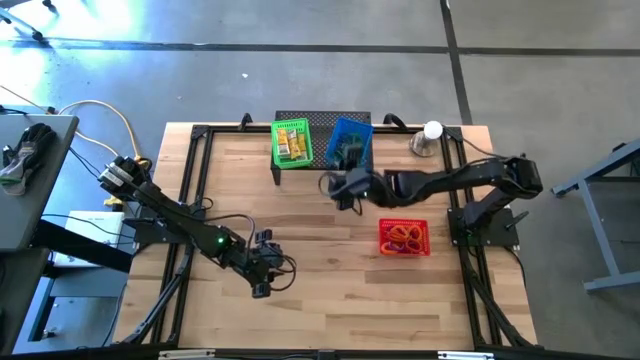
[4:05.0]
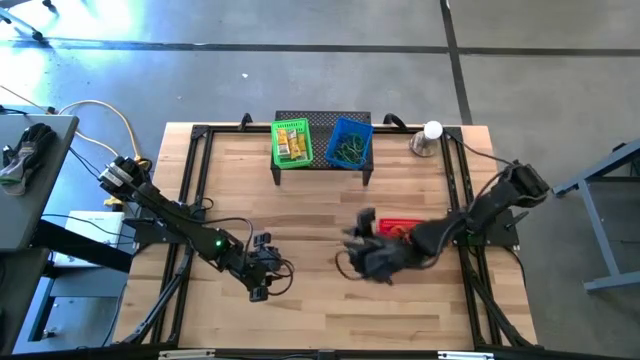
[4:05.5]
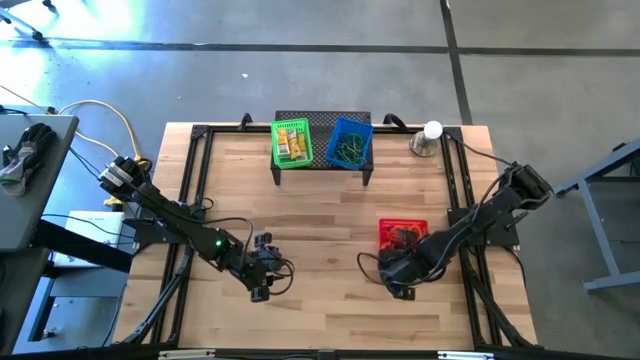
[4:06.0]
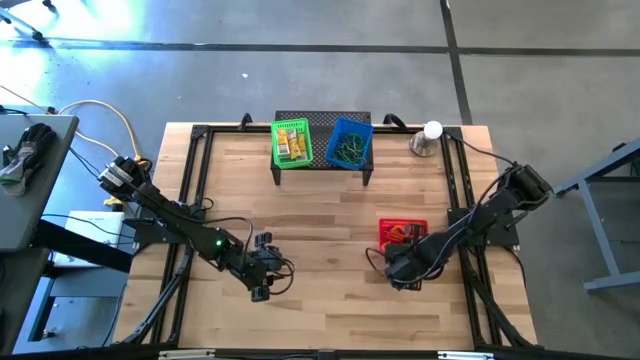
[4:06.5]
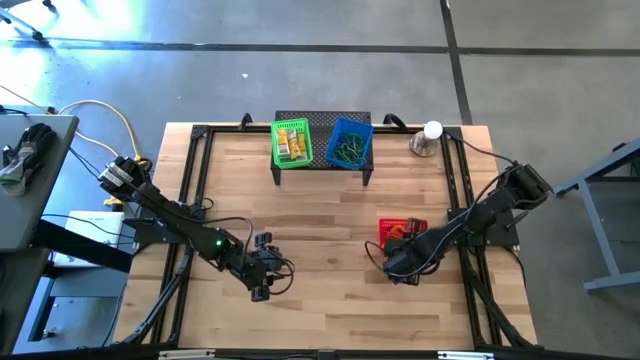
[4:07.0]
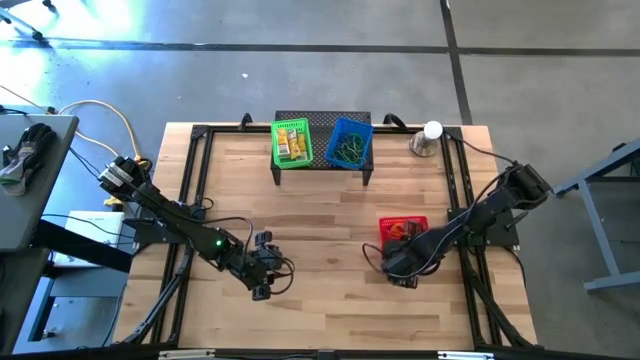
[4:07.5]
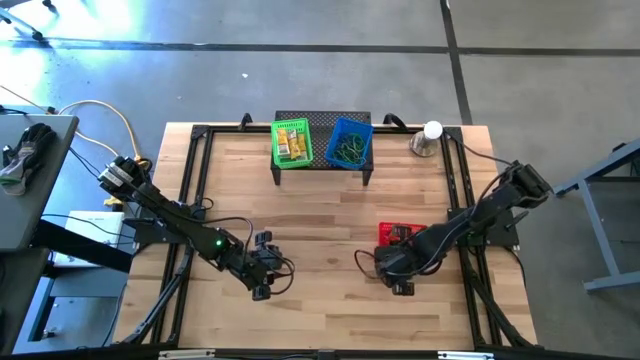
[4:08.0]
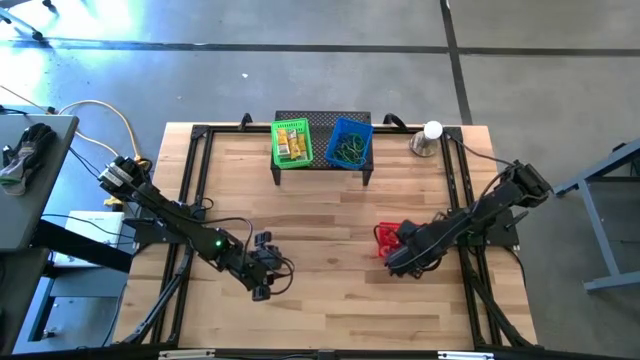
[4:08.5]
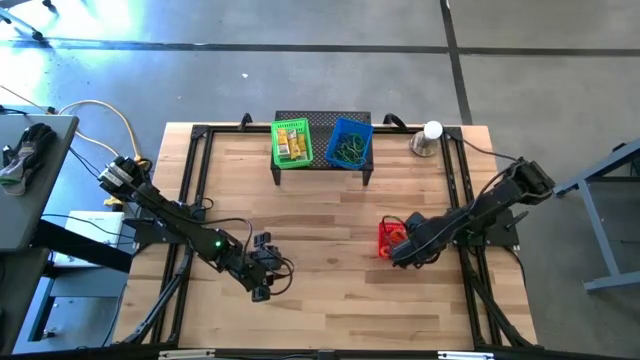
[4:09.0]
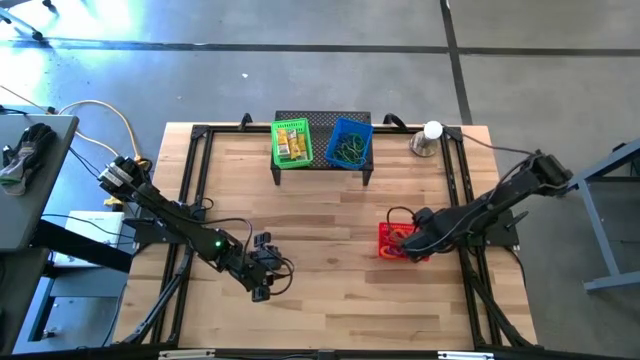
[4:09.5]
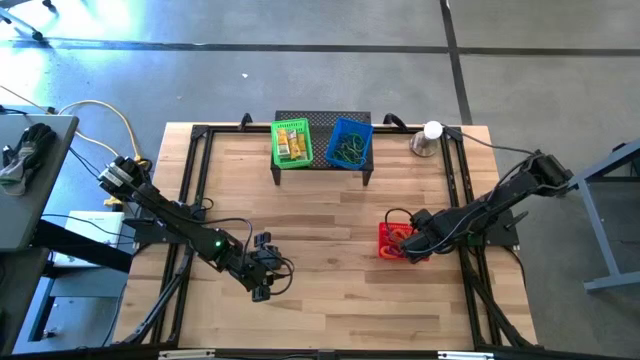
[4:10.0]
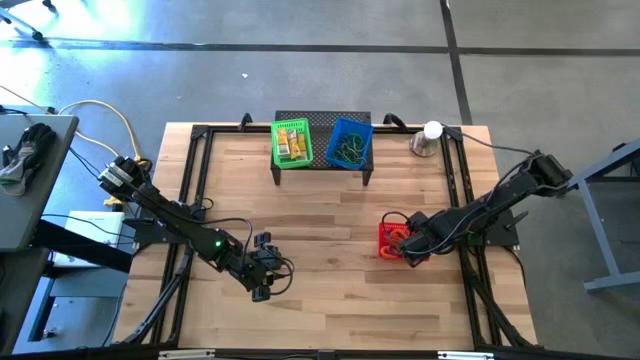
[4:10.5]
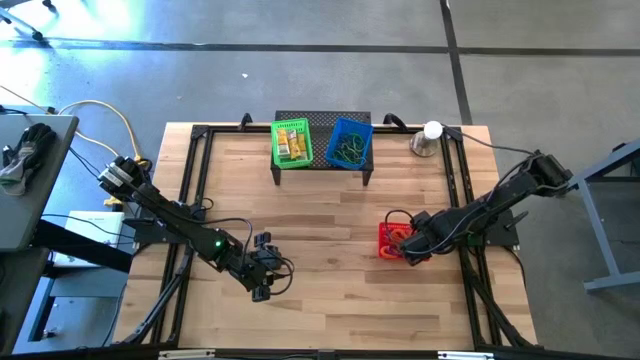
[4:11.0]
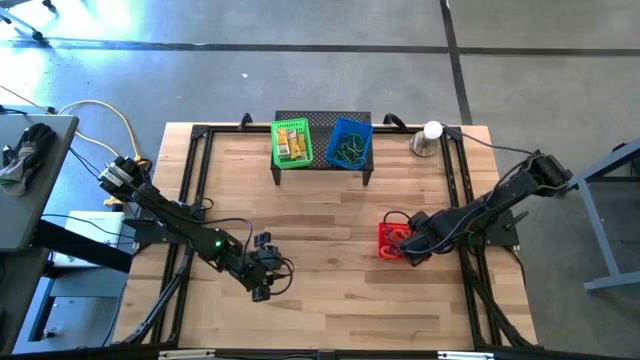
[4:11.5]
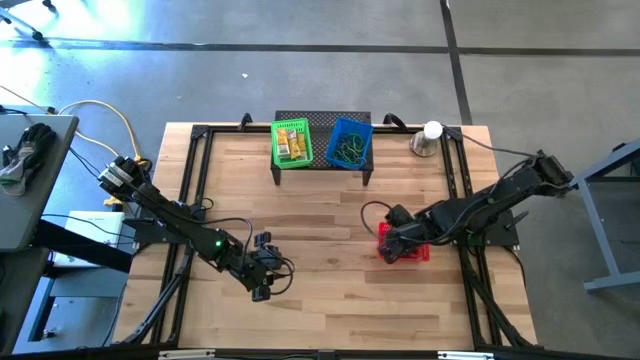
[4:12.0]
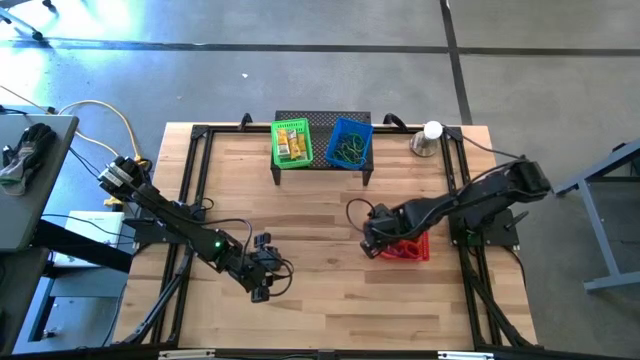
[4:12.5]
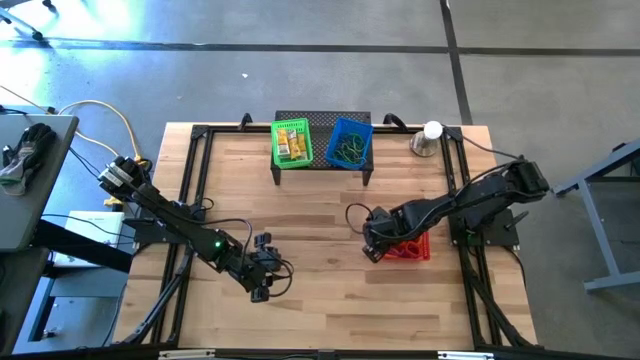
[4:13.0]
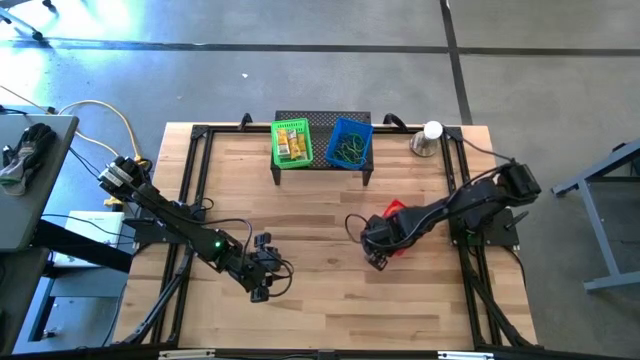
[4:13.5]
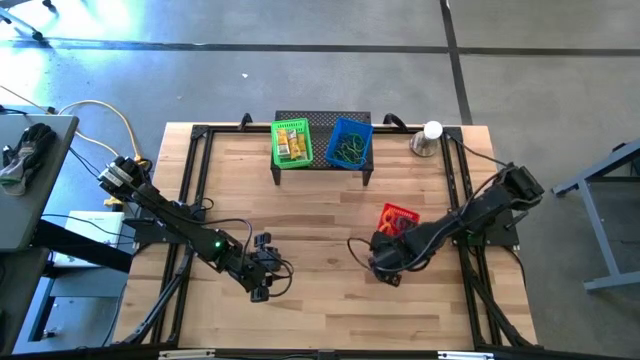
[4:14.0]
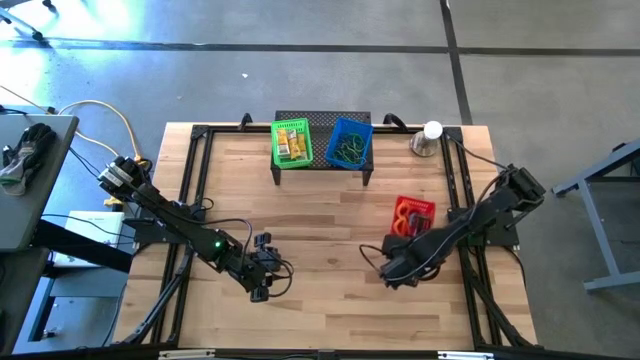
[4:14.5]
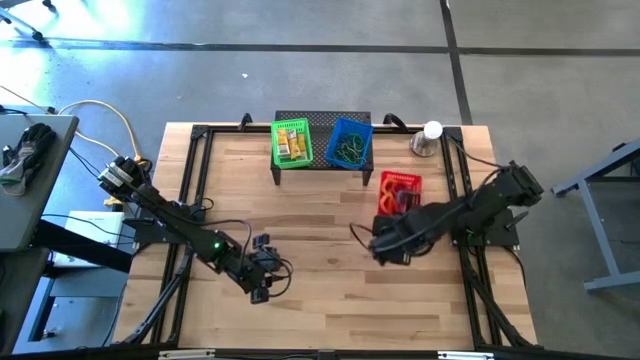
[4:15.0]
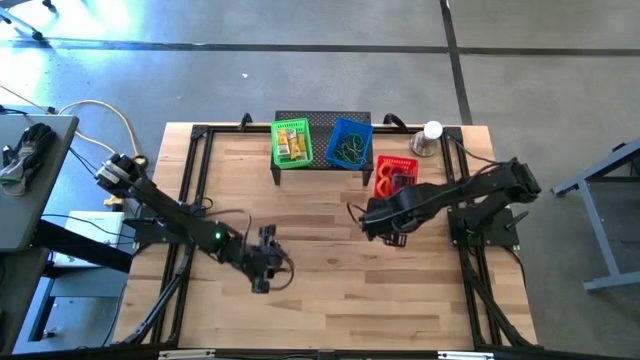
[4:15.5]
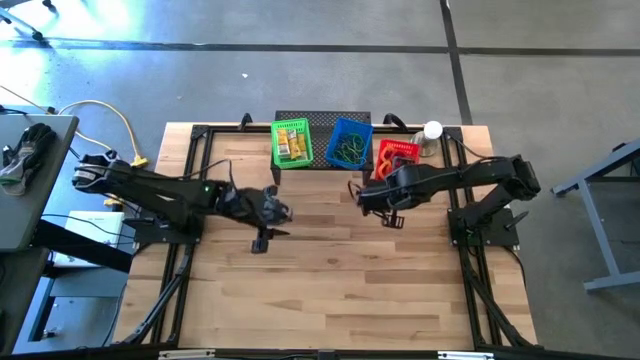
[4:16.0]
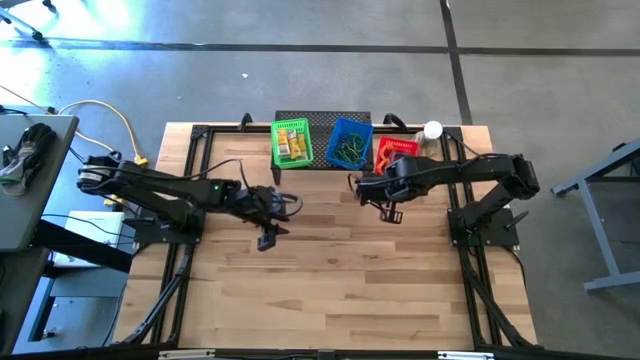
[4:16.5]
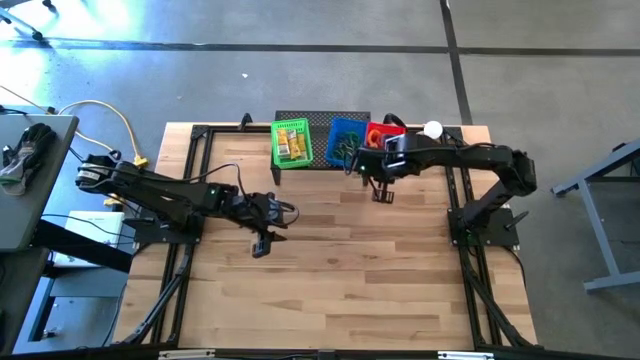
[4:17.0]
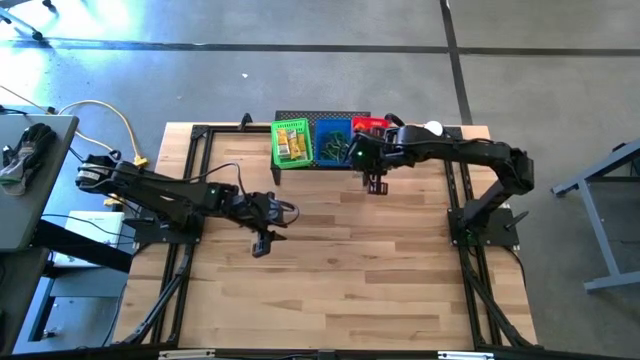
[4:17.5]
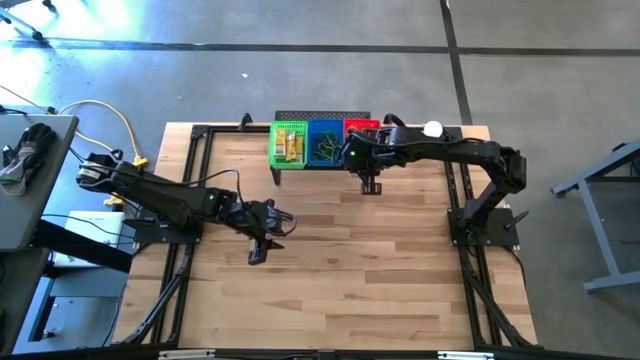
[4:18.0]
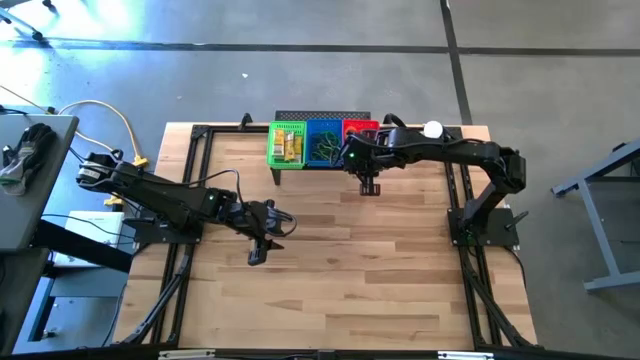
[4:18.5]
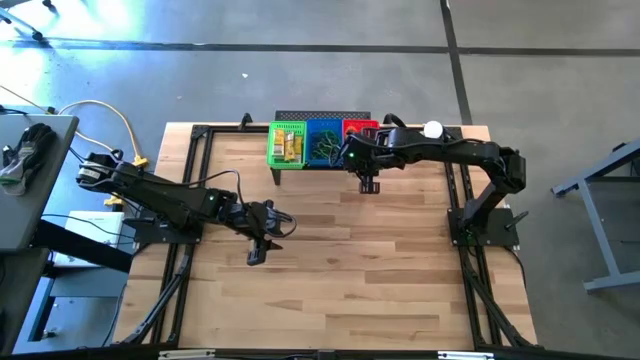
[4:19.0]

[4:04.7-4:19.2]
Task: Pick & Place Office Desk Supplies
Put the red basket with the spring keychains on the shelf

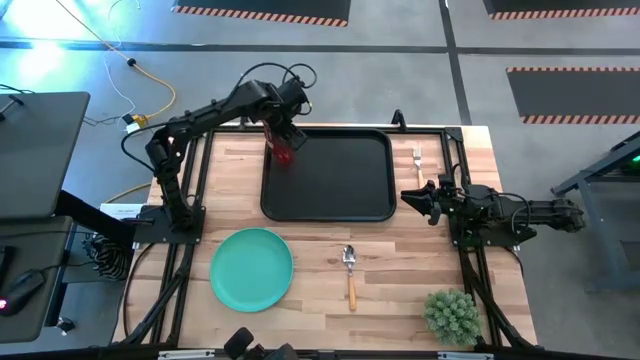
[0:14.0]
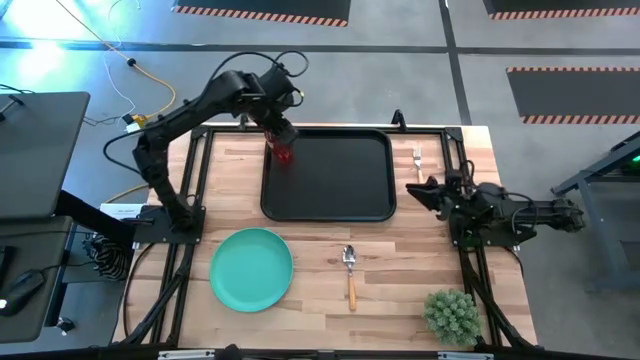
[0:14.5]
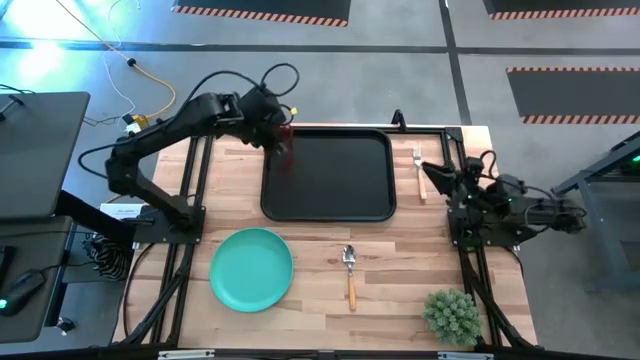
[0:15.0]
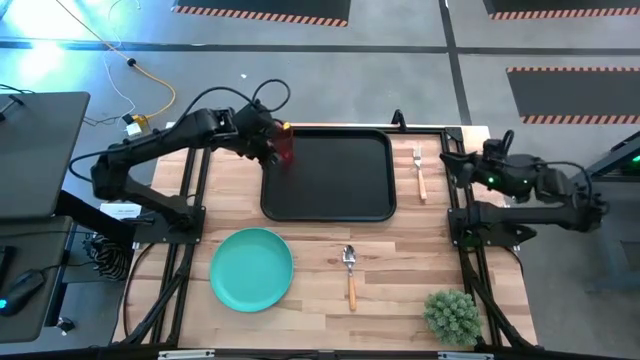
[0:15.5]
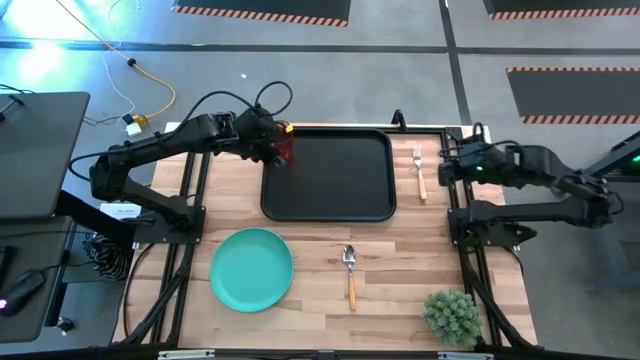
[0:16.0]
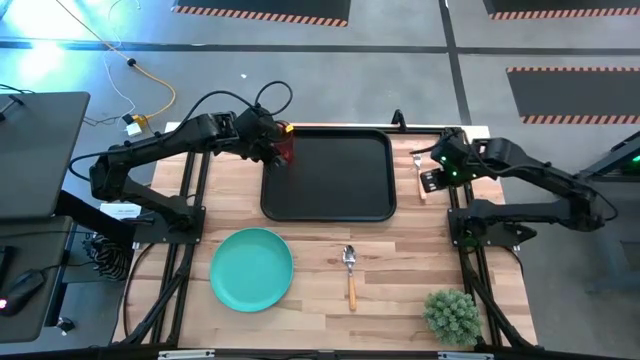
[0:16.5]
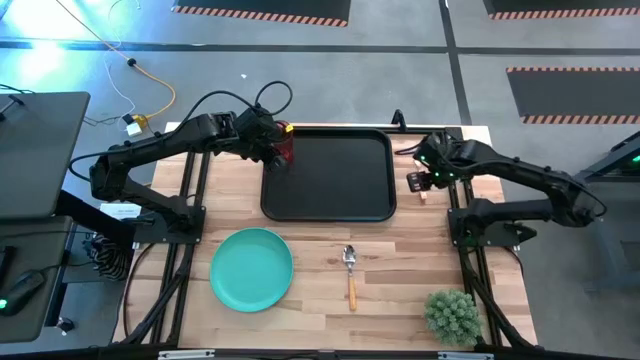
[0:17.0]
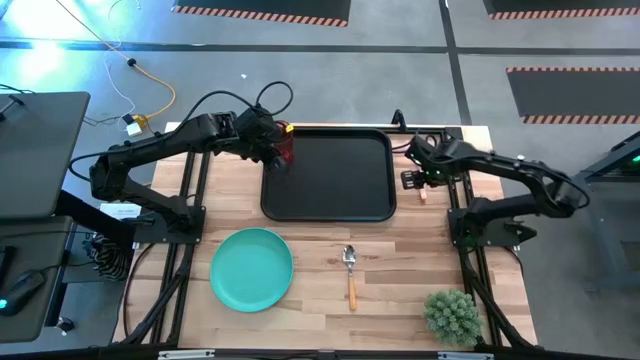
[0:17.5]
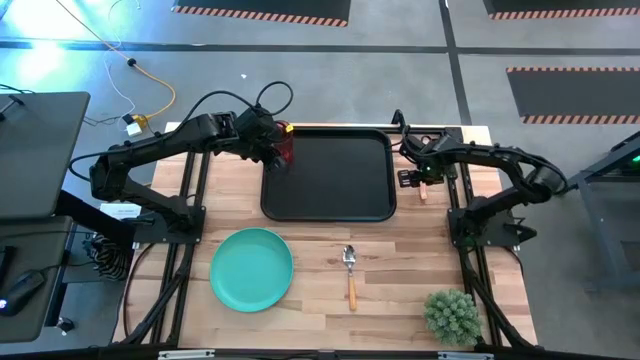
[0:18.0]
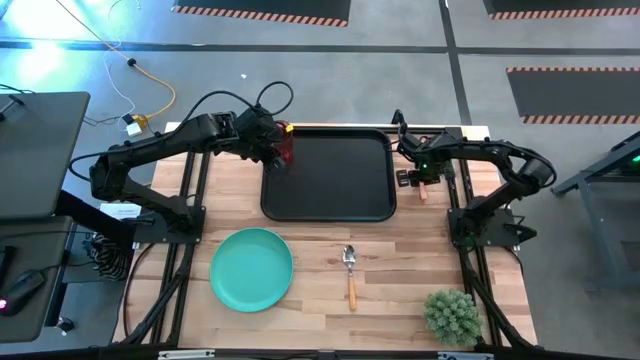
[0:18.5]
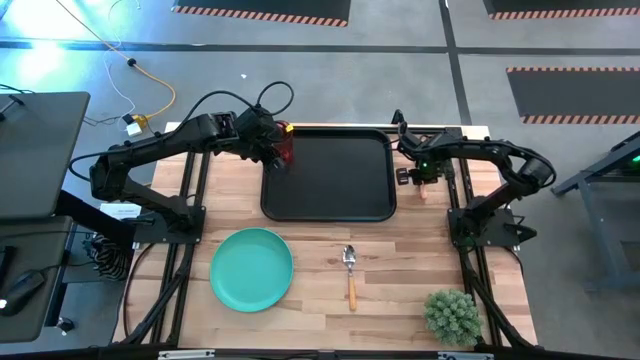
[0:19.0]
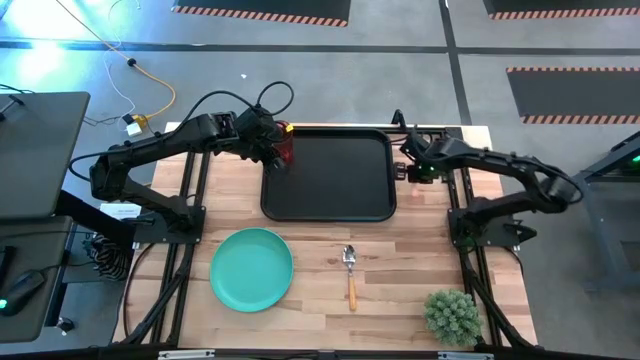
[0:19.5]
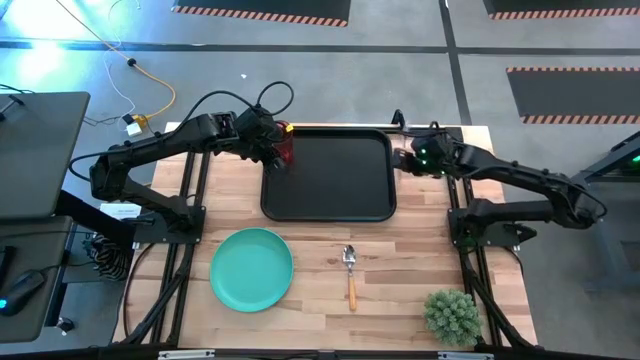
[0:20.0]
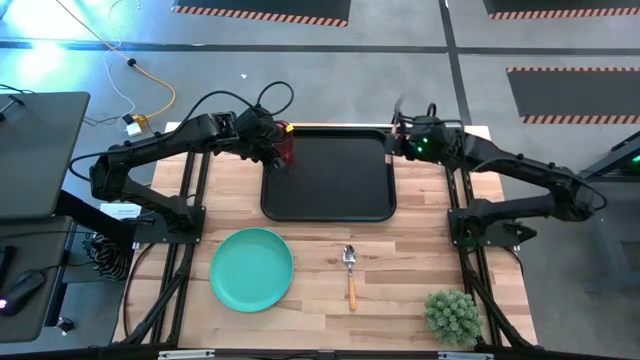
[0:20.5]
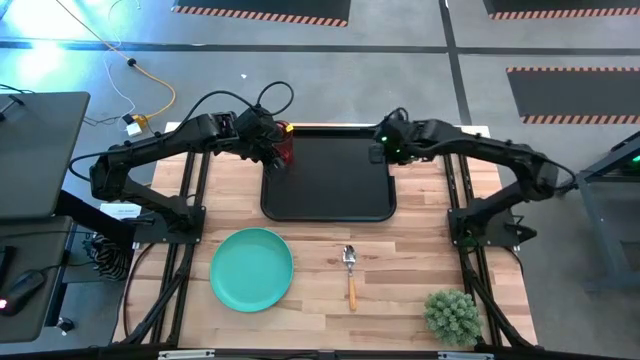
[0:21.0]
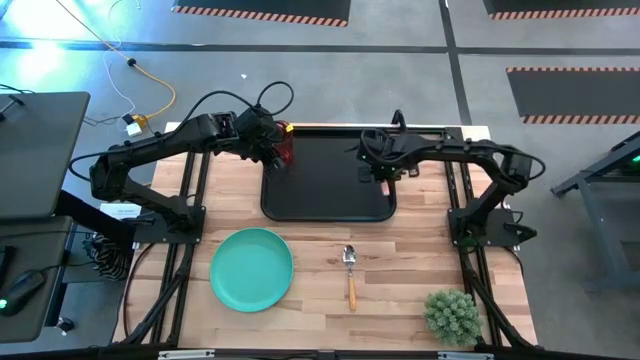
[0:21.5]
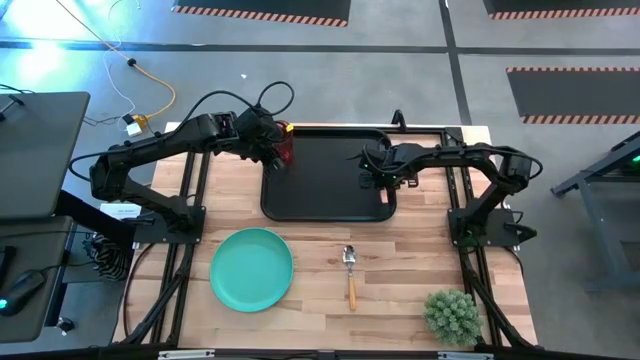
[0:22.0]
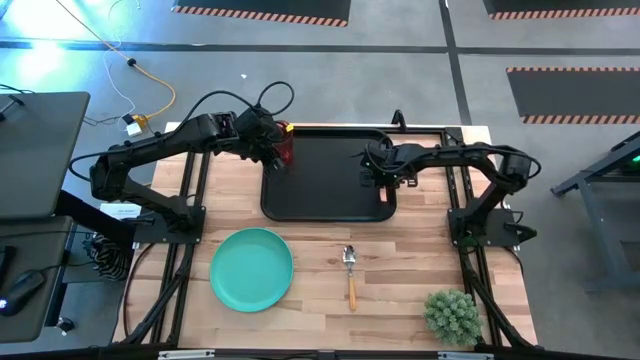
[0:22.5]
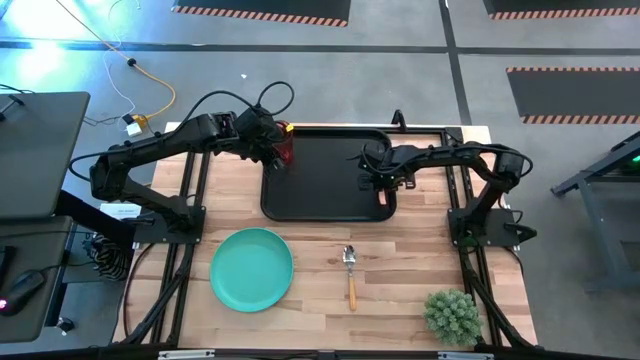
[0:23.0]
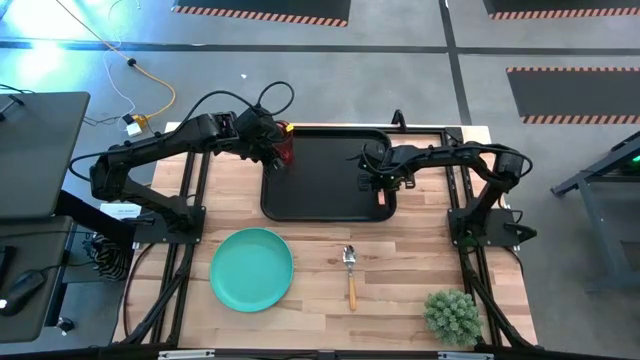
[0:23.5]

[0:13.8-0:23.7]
Task: Pick and place plate/cup/fork/spoon on tray
Put the orange fork on the right of the black tray
